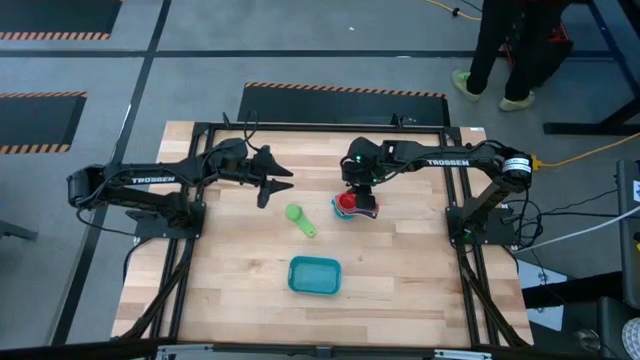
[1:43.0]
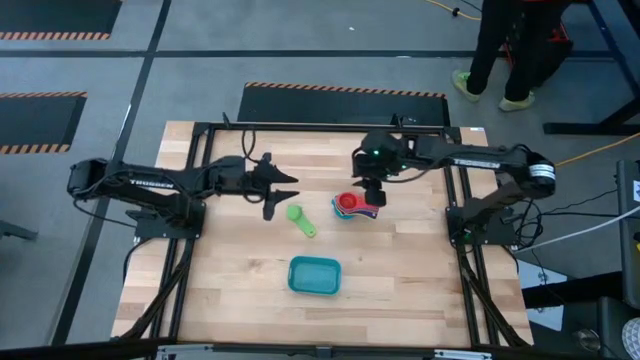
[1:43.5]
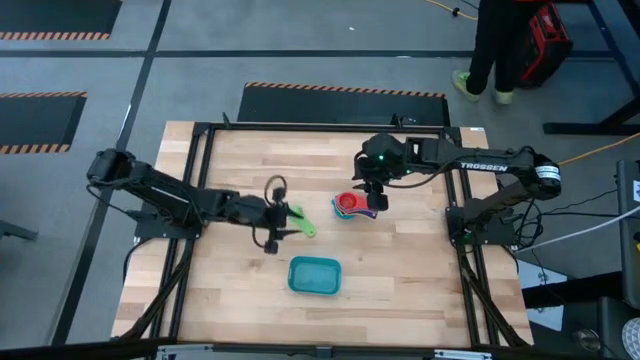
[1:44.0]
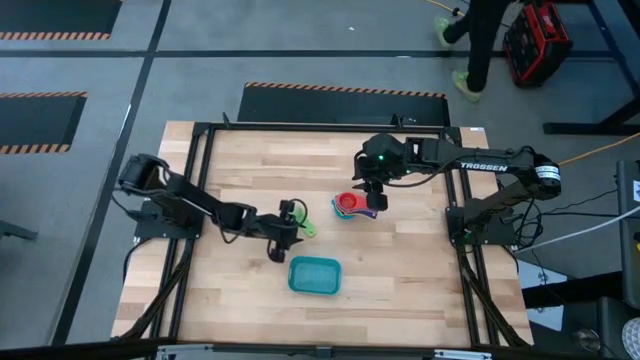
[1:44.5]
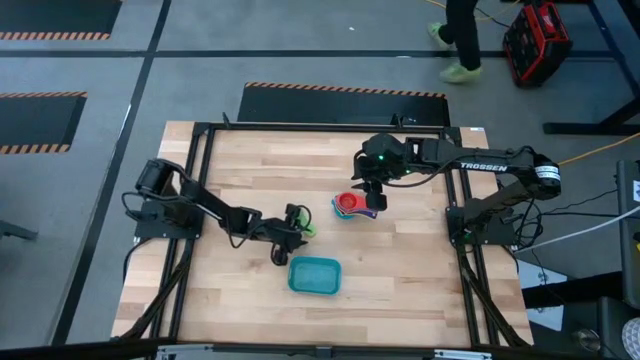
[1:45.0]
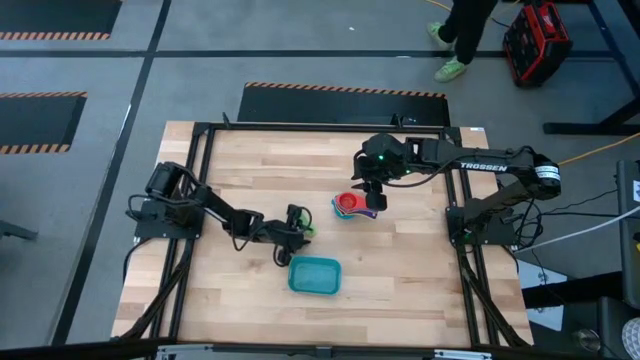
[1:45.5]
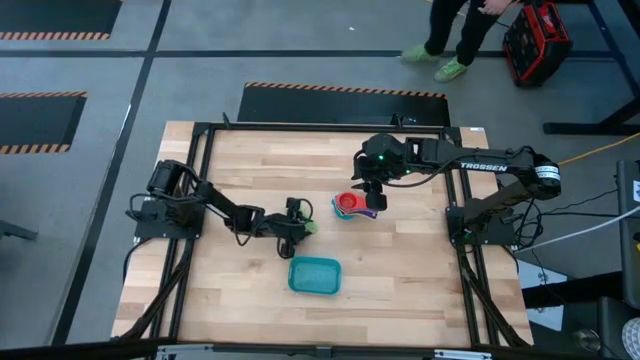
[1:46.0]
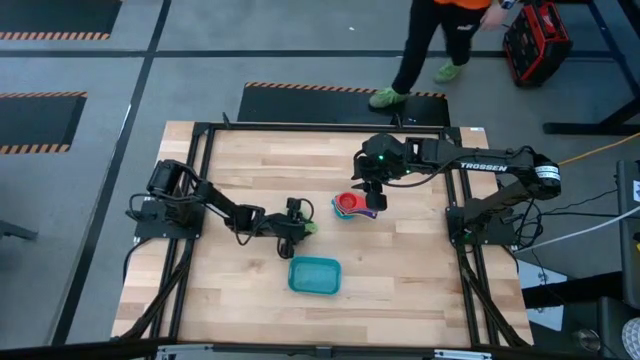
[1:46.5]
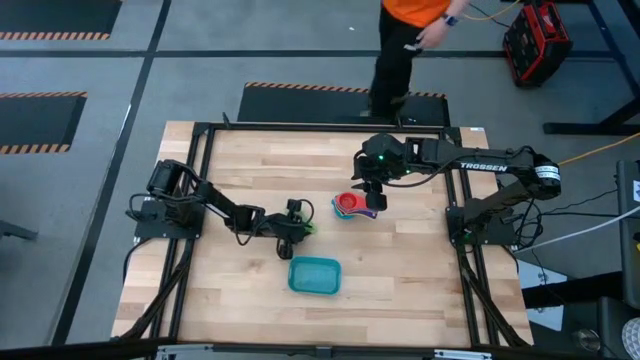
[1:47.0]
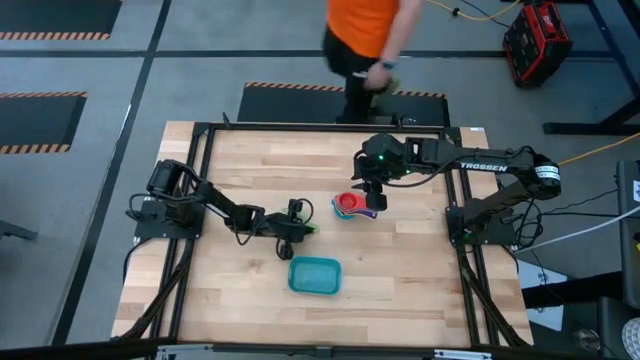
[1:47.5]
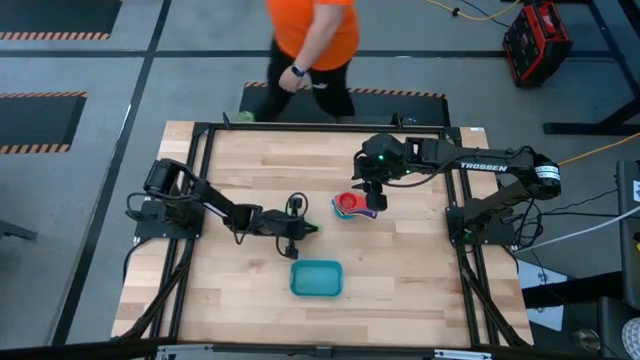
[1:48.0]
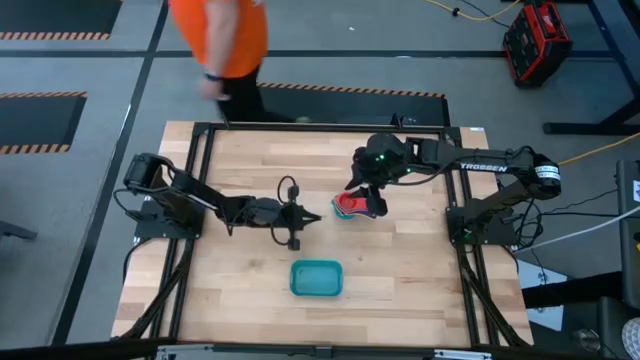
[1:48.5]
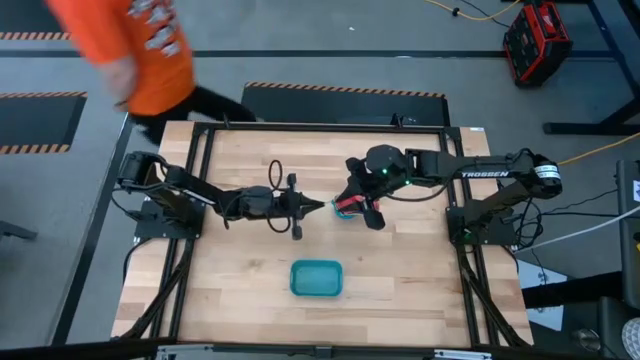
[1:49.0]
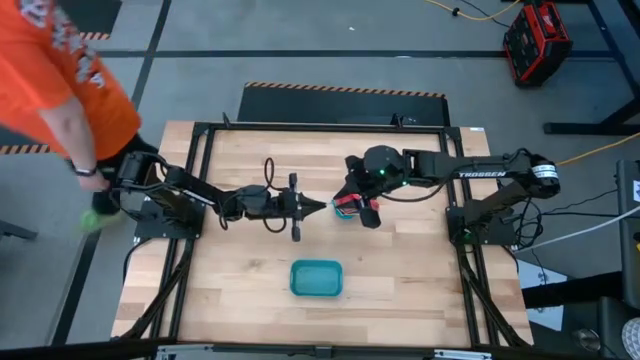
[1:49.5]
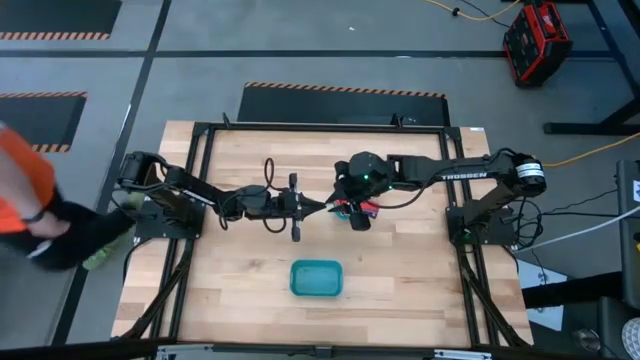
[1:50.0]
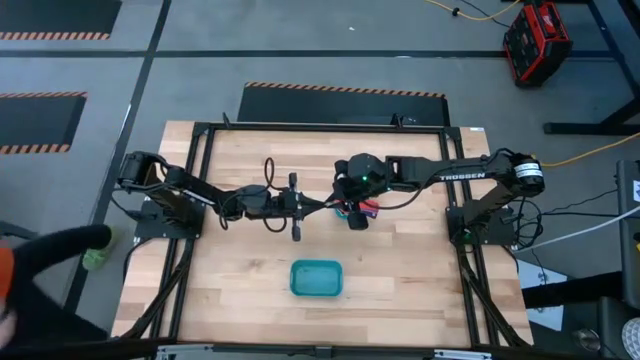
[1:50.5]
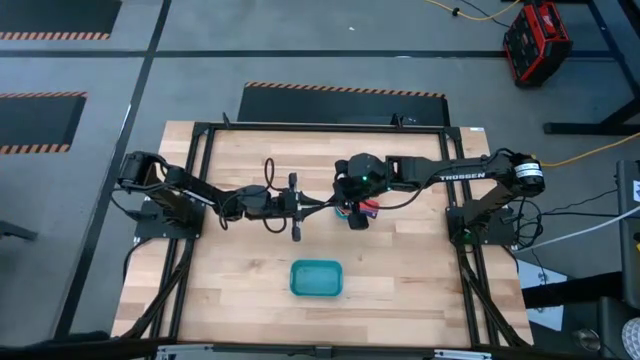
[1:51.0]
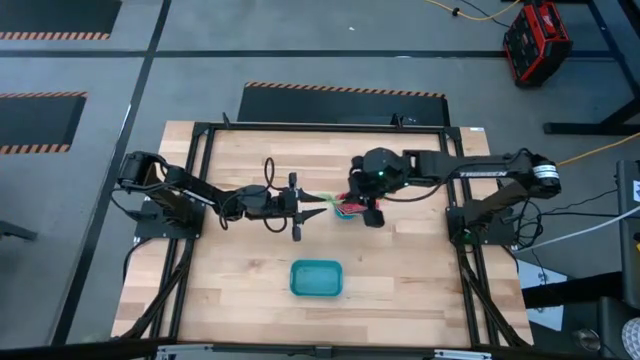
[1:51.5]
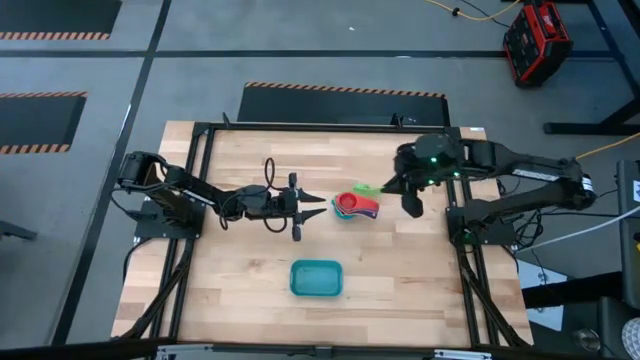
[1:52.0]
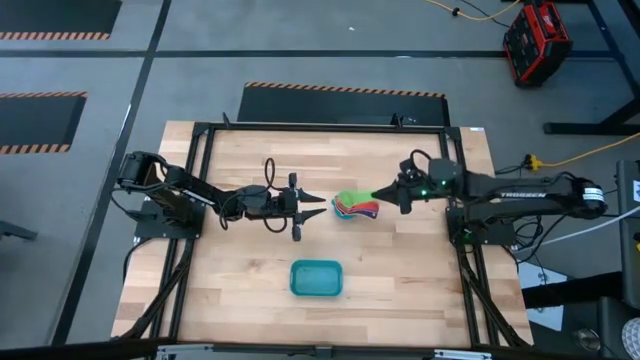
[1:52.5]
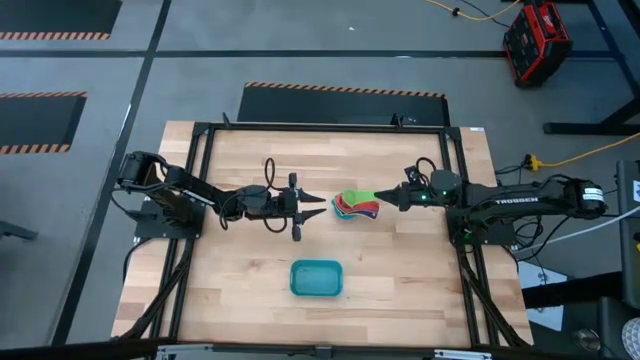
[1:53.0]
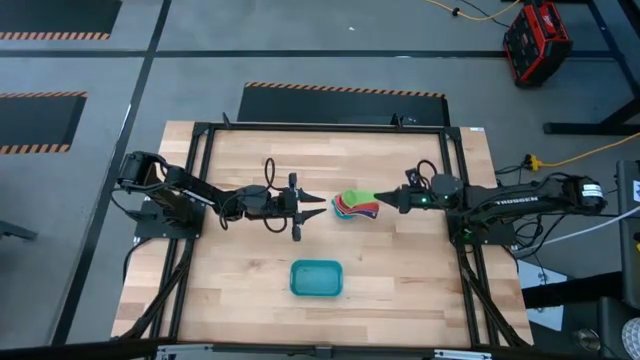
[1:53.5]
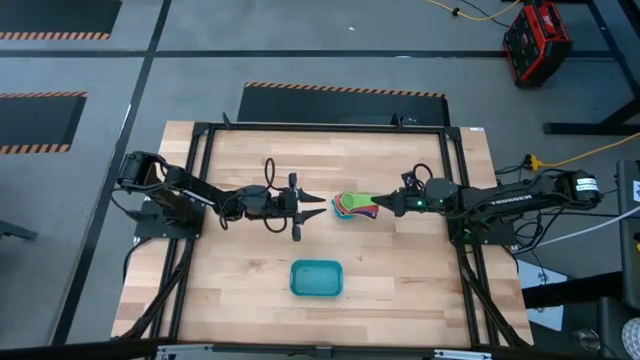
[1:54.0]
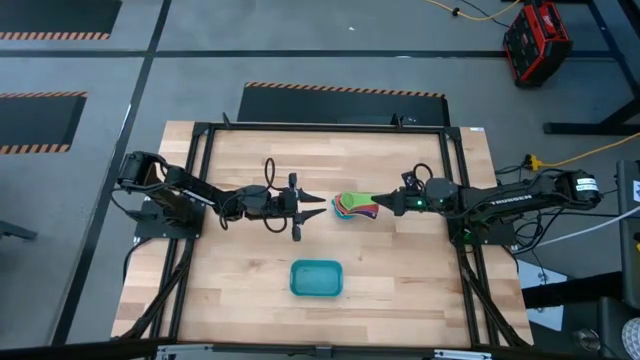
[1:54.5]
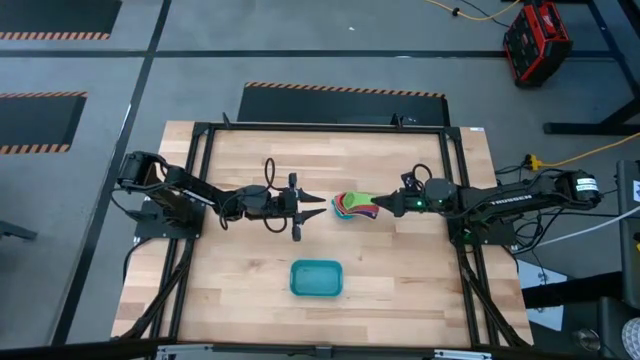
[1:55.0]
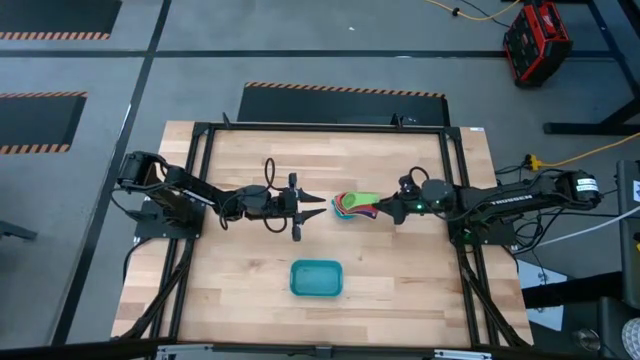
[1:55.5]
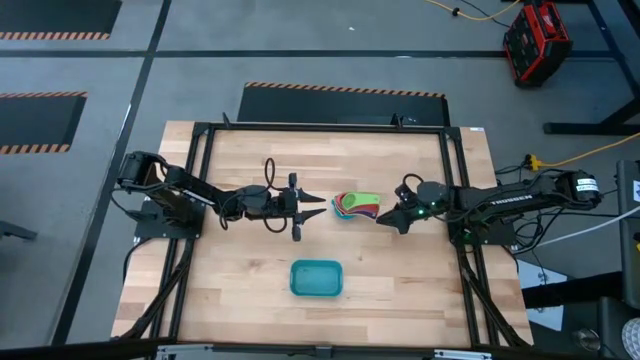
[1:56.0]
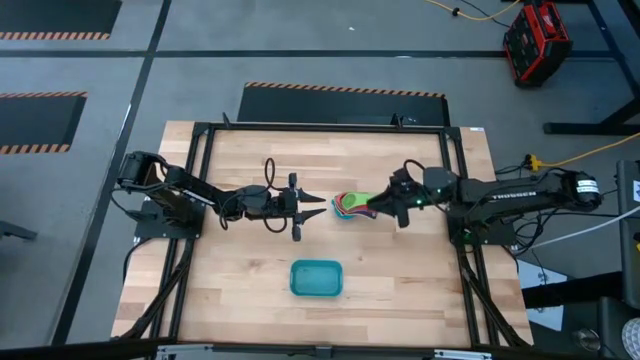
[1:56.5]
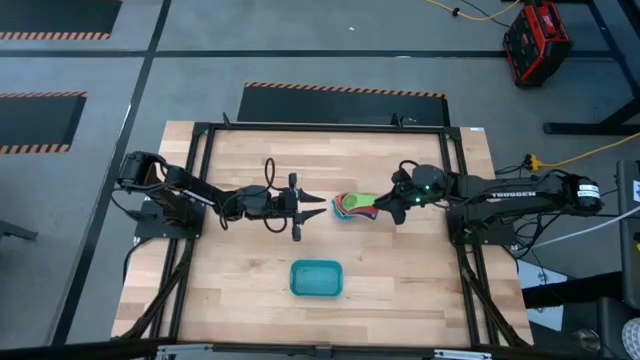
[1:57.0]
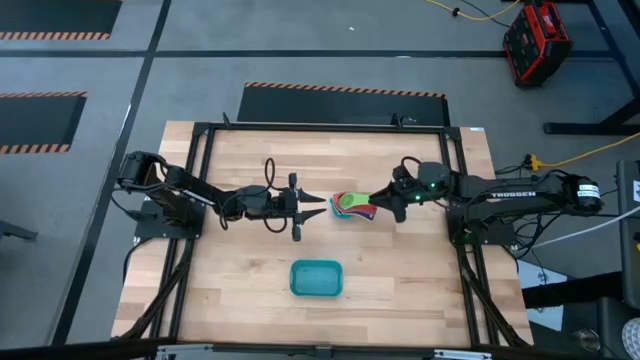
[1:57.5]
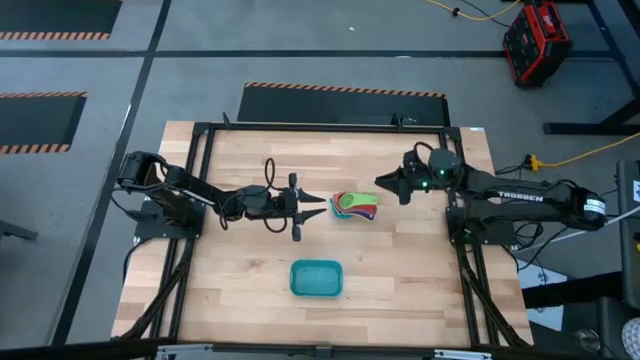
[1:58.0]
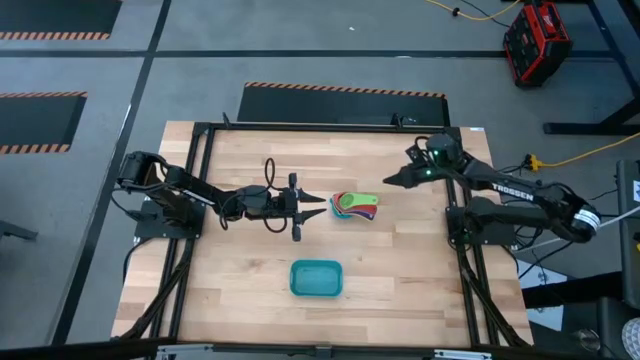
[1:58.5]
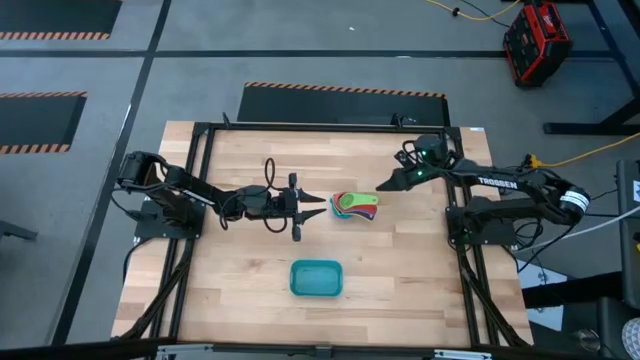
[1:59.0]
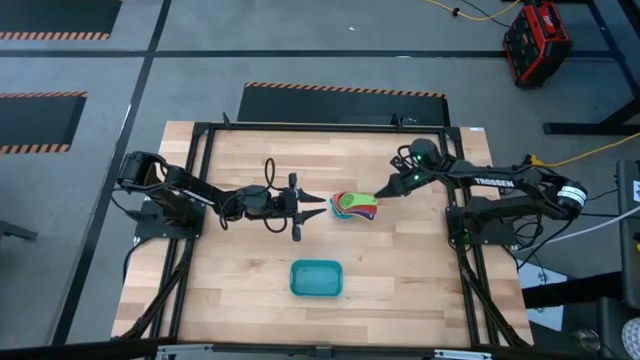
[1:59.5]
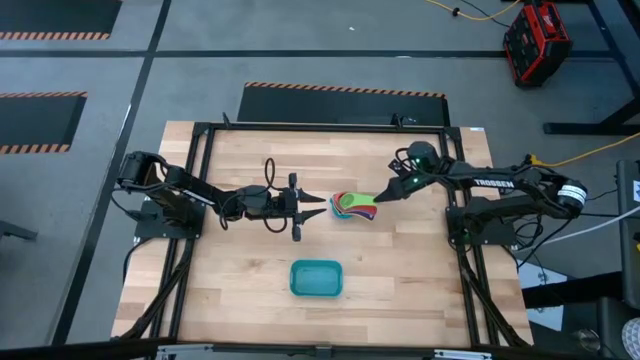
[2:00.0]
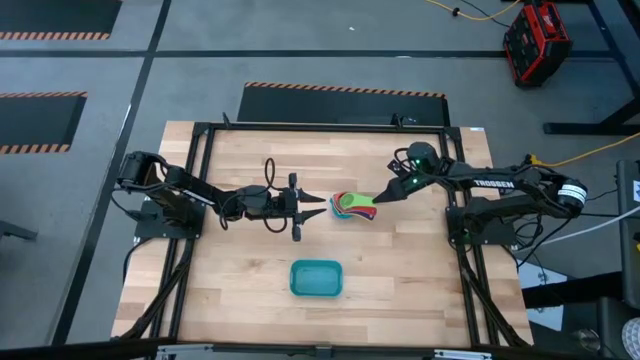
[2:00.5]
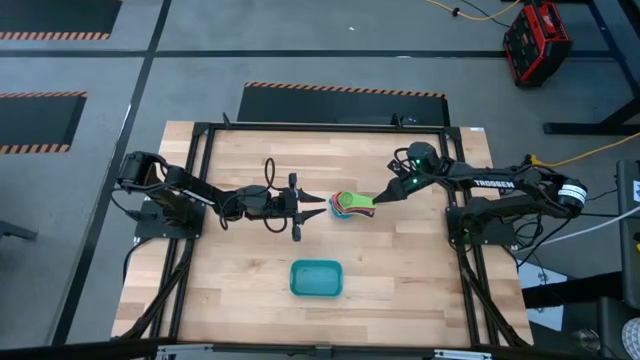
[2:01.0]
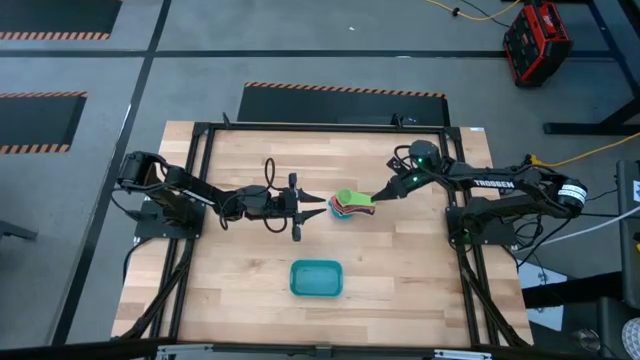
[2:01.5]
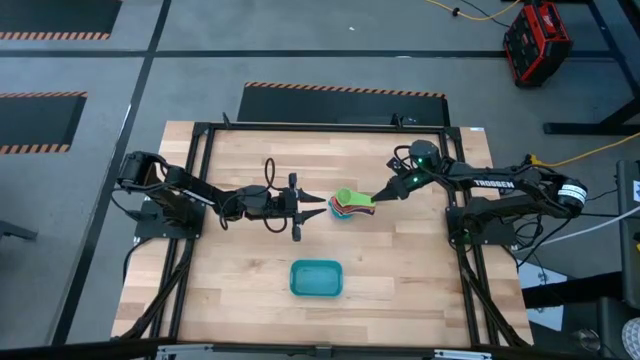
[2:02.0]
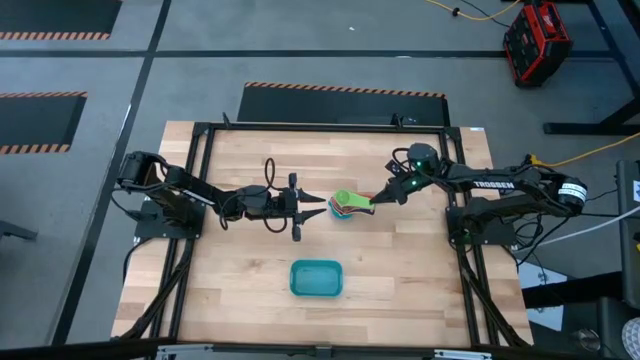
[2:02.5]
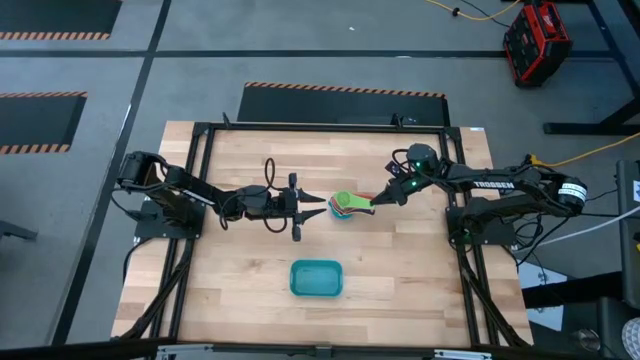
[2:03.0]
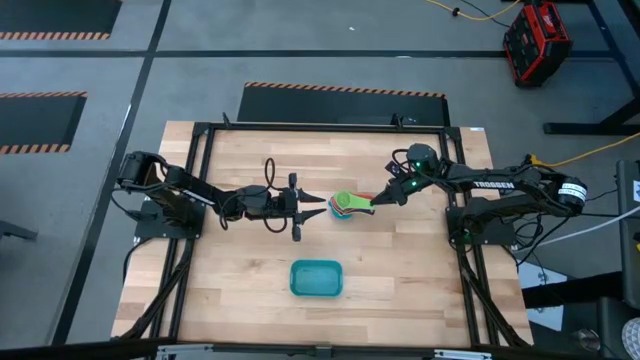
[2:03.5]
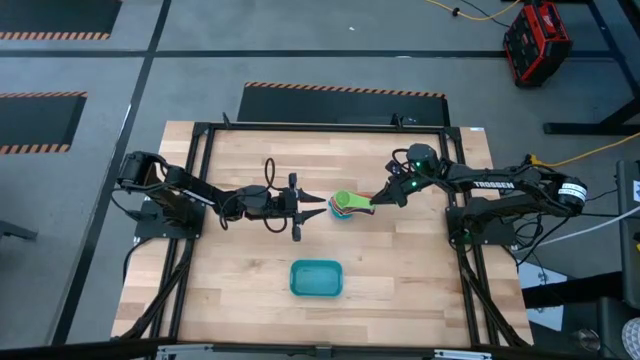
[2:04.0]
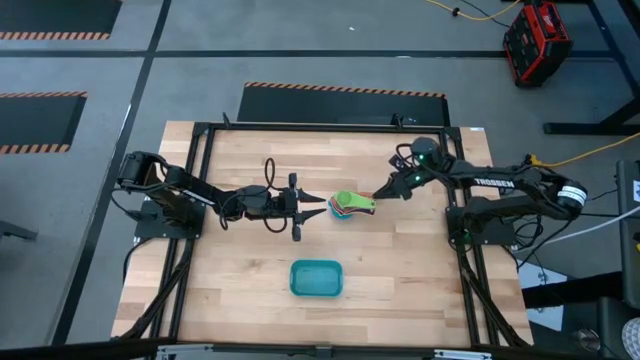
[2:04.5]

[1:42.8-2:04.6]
Task: Nest measuring cups in basket
Stack the green measuring cup on top of the red measuring cup
